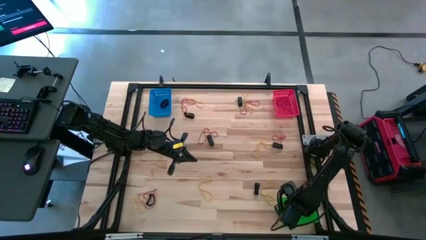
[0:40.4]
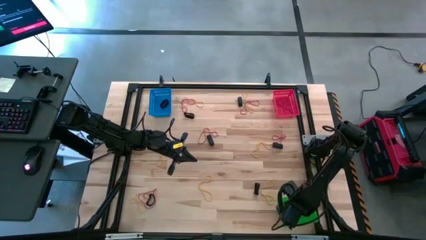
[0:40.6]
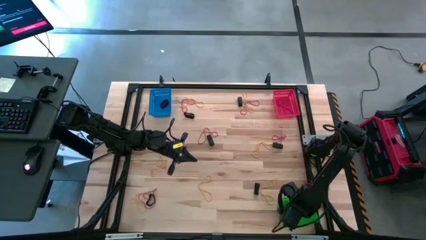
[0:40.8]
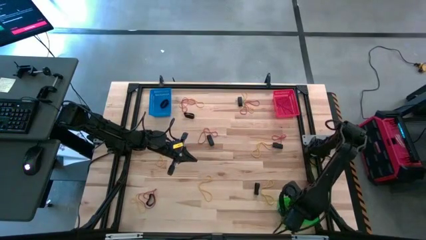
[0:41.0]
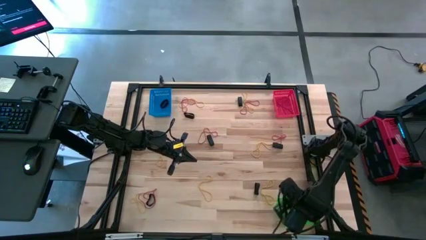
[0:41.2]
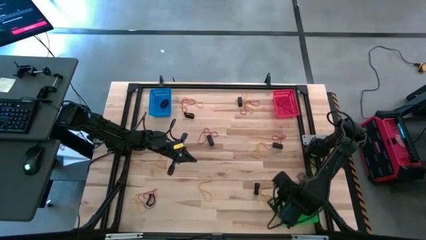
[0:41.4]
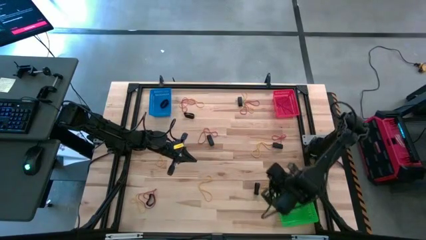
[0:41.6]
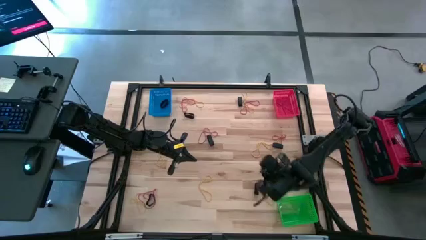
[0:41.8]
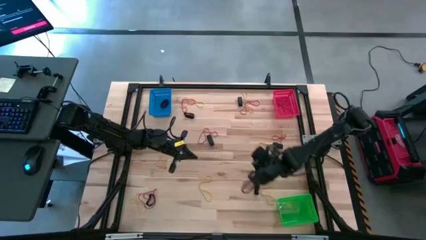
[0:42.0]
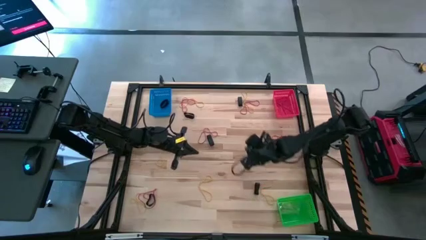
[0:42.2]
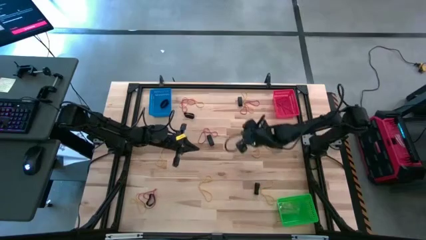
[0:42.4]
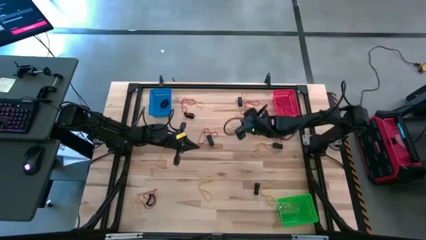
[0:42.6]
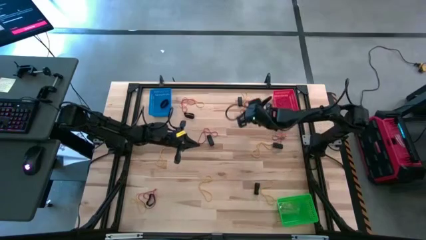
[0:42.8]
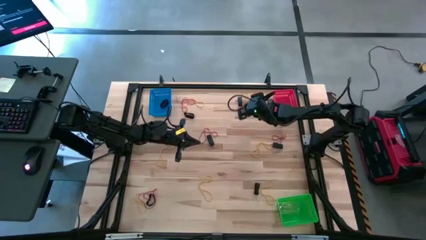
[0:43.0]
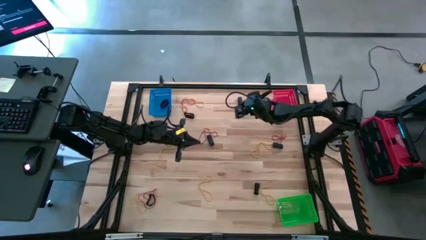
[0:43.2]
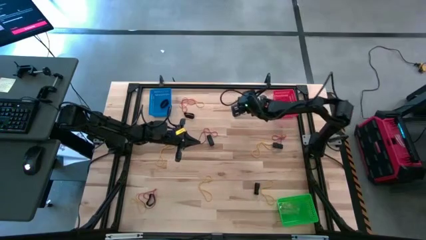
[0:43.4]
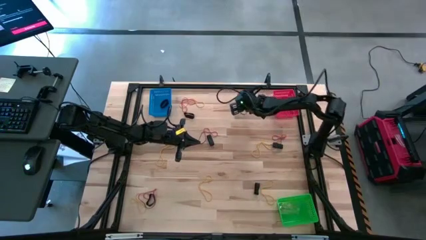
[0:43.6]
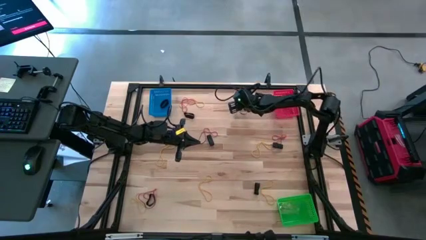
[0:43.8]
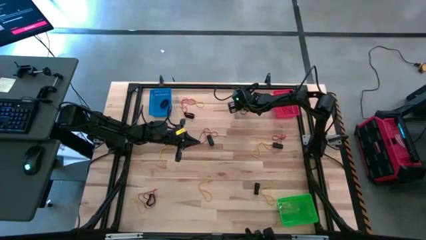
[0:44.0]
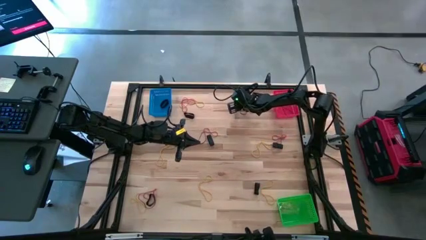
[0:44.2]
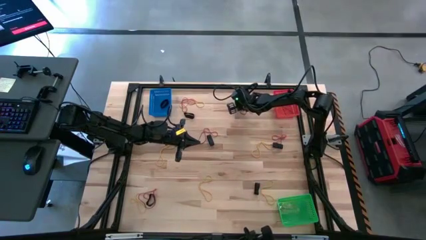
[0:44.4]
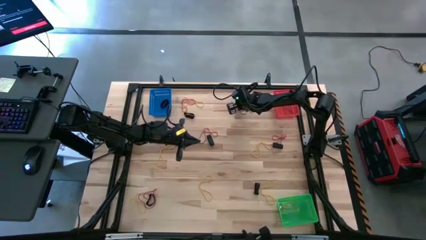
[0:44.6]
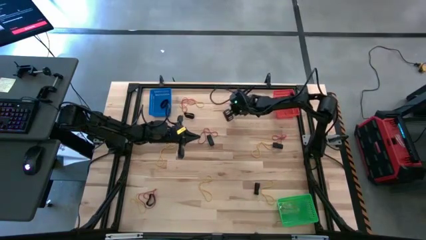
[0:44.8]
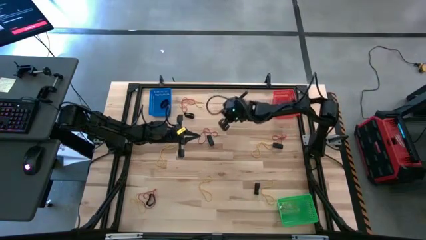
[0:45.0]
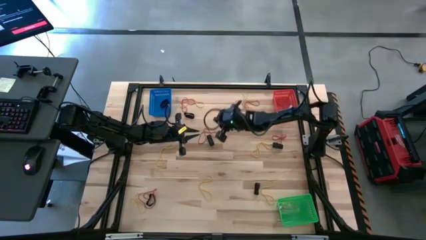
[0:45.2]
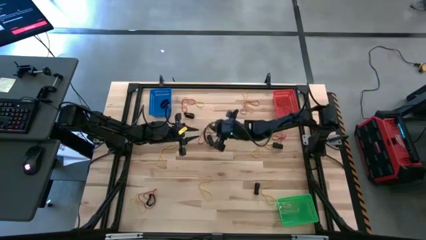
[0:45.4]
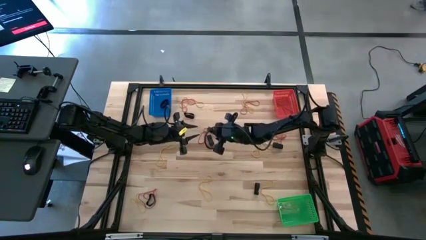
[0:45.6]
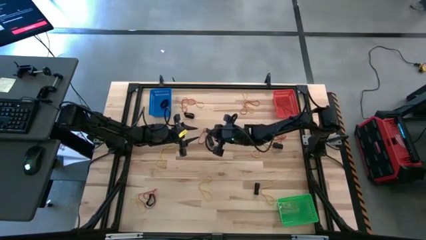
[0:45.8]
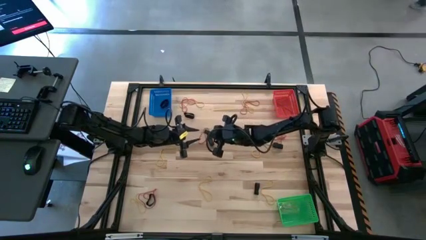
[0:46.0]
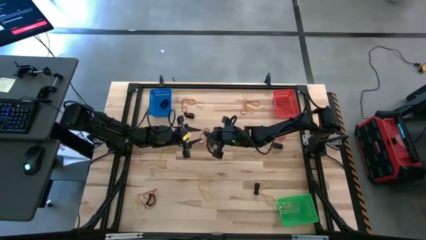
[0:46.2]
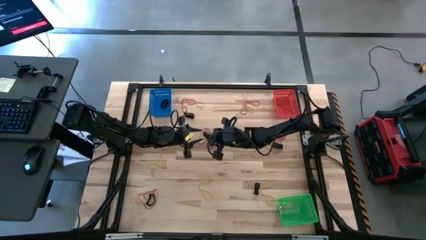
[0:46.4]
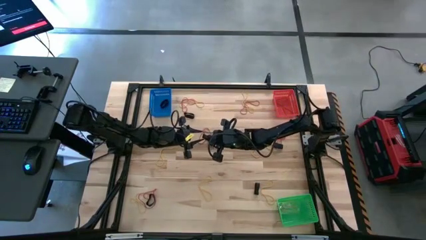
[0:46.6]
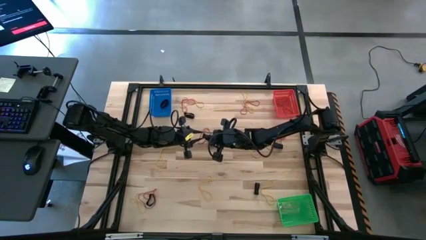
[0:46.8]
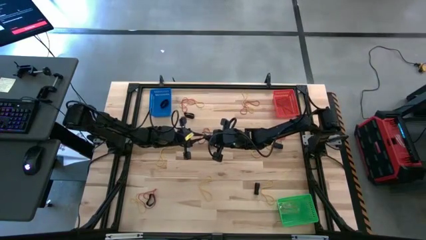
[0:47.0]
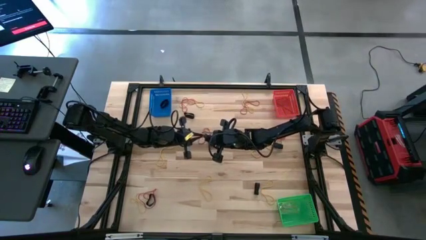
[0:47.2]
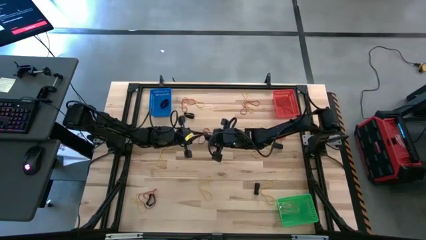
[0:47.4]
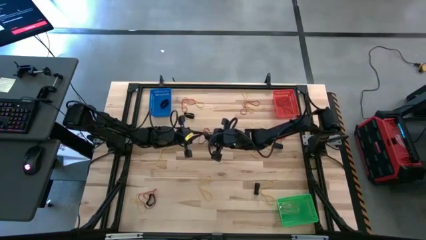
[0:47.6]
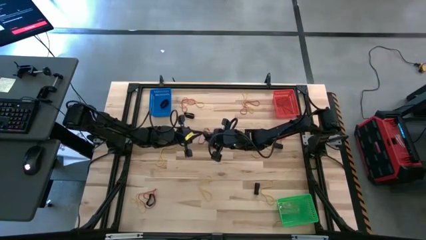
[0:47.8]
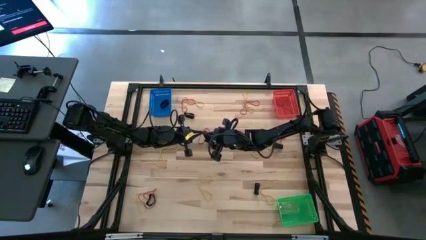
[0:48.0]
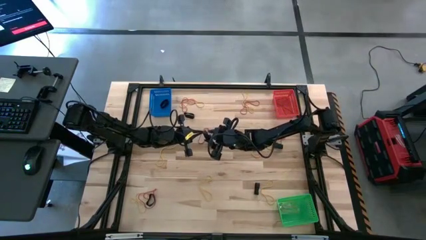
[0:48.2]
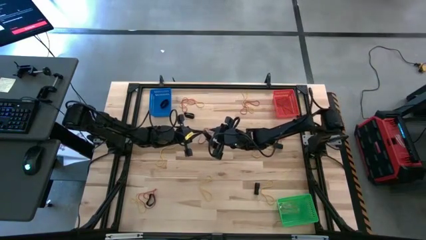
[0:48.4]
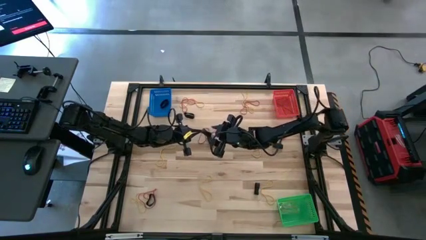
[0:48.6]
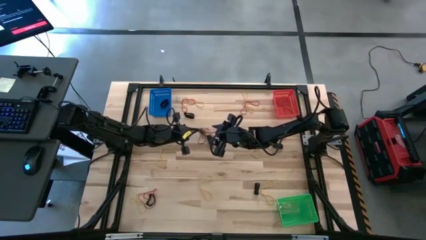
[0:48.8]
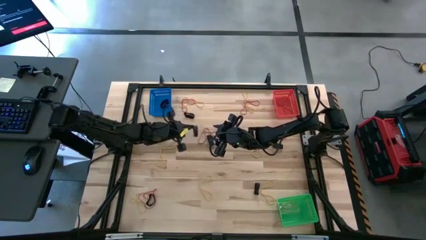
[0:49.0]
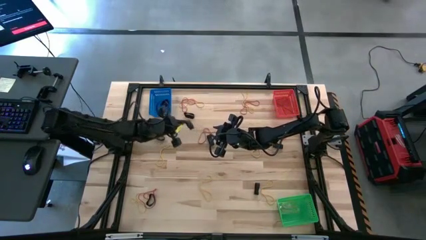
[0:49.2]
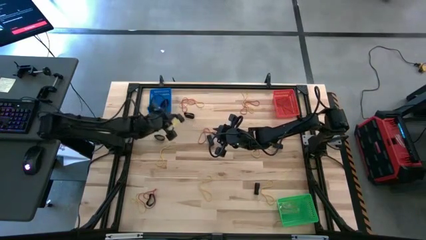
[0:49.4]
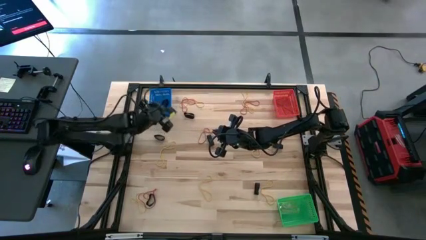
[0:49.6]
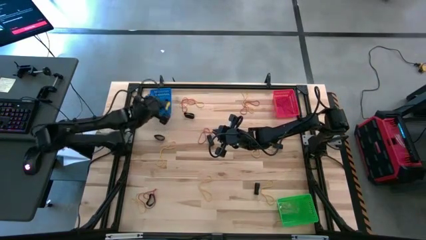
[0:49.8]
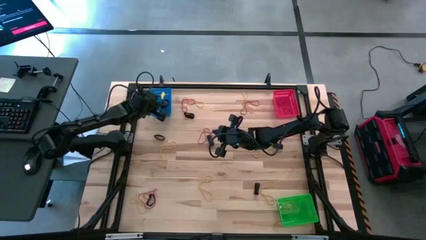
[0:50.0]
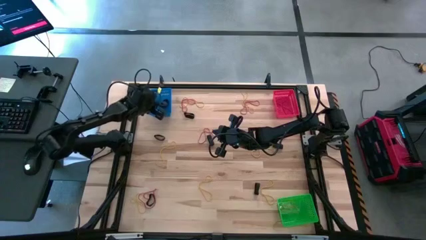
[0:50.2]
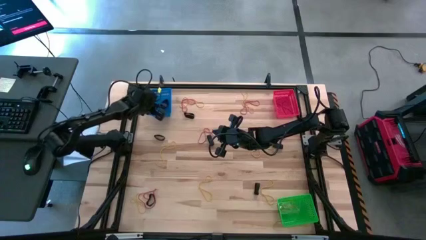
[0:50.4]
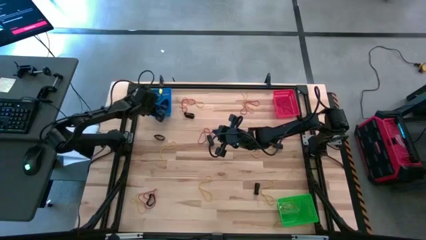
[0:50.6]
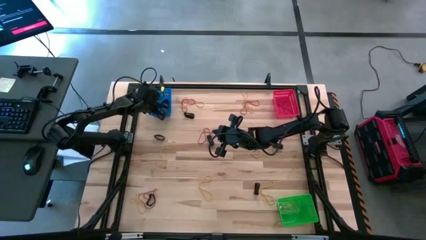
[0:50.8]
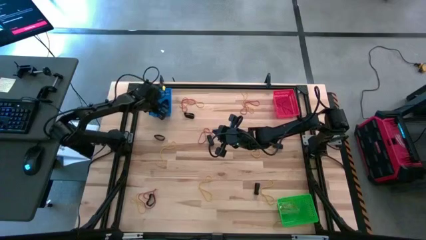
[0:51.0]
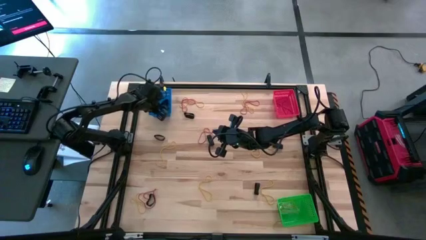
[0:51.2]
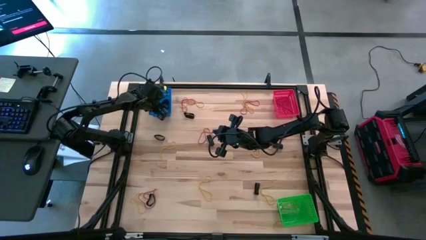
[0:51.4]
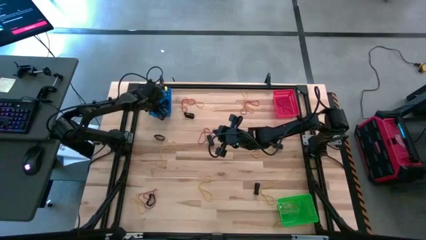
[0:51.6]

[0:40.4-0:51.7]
Task: Sort rubber bands into baskets
Put the black rubber band into the blue bin
